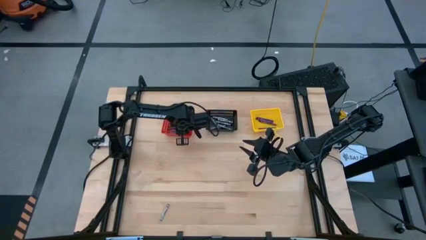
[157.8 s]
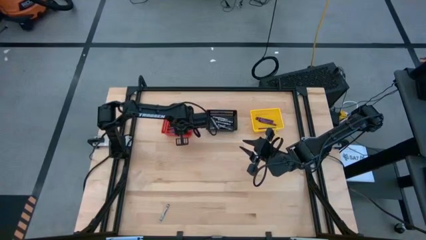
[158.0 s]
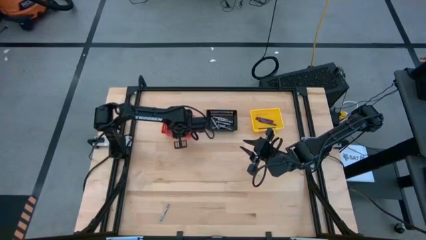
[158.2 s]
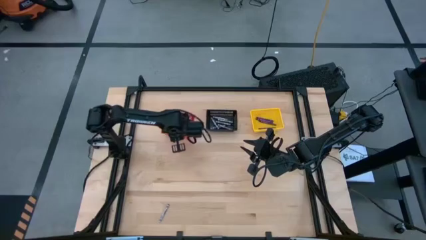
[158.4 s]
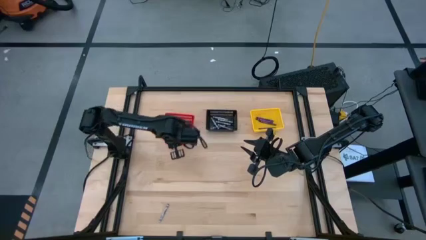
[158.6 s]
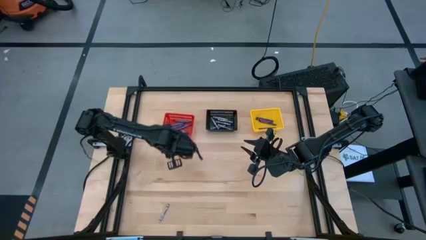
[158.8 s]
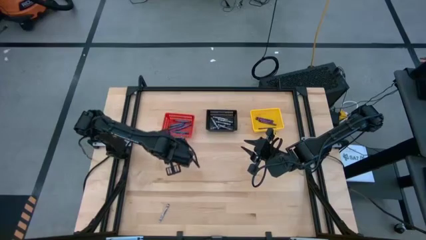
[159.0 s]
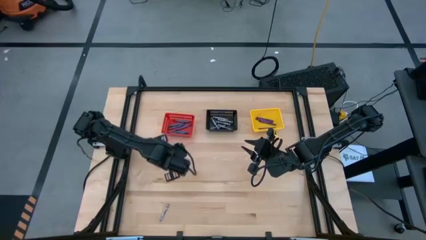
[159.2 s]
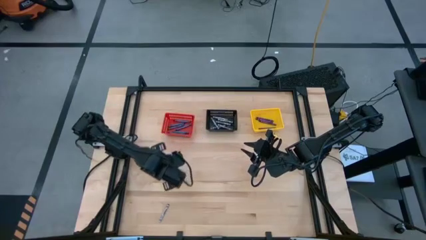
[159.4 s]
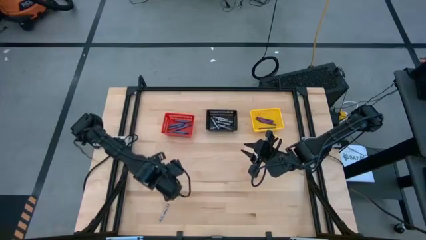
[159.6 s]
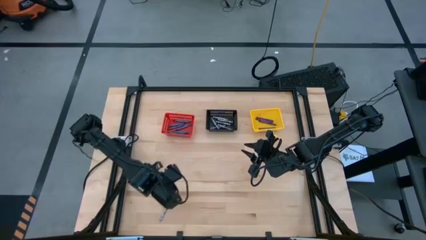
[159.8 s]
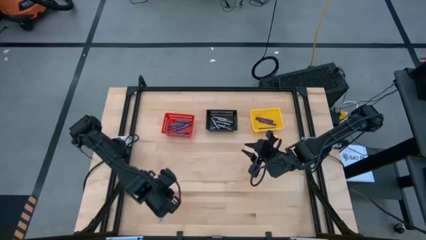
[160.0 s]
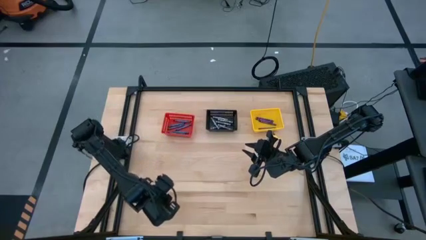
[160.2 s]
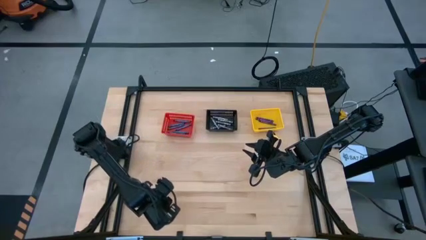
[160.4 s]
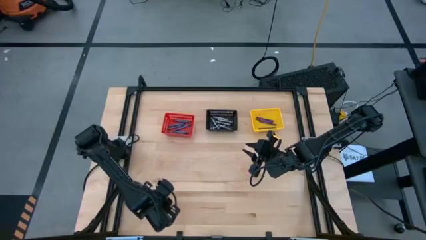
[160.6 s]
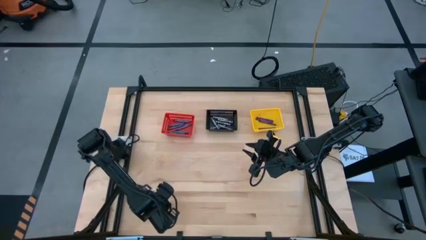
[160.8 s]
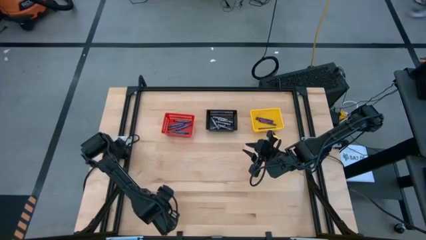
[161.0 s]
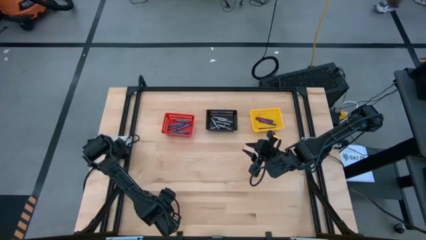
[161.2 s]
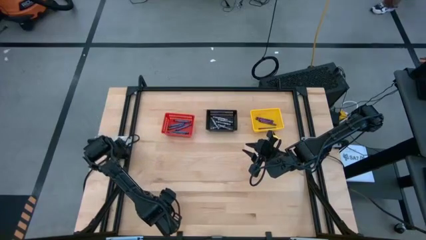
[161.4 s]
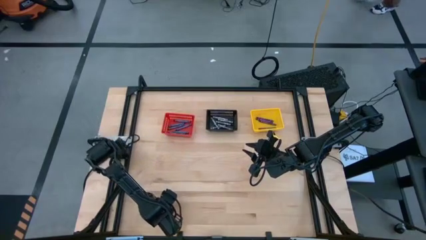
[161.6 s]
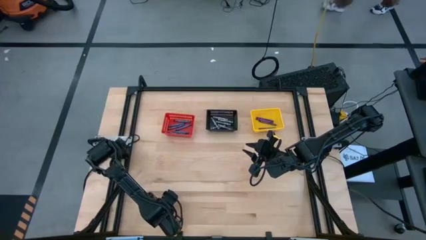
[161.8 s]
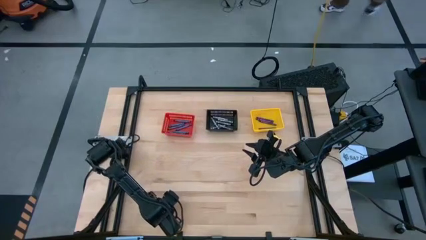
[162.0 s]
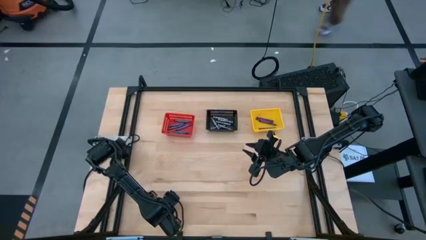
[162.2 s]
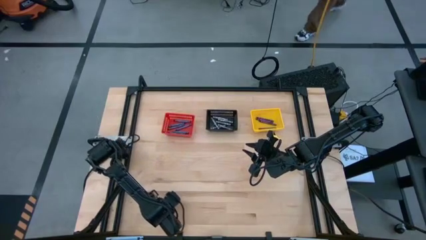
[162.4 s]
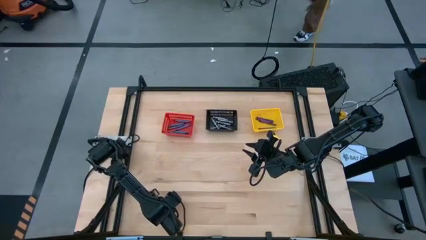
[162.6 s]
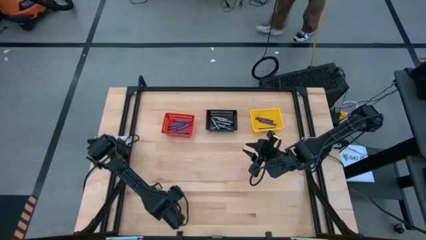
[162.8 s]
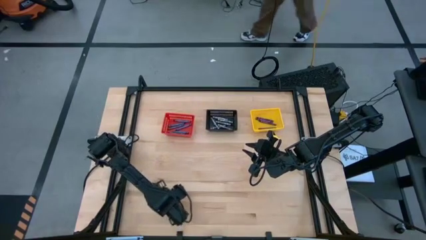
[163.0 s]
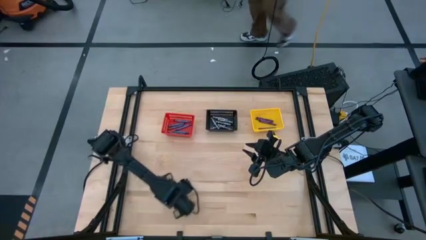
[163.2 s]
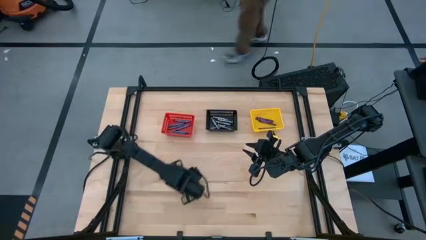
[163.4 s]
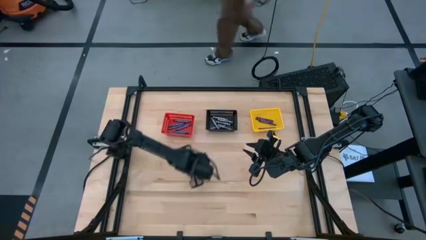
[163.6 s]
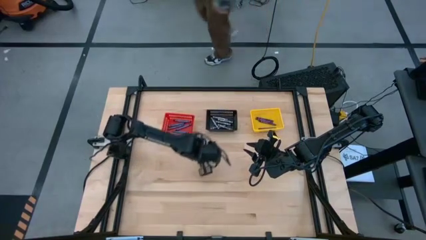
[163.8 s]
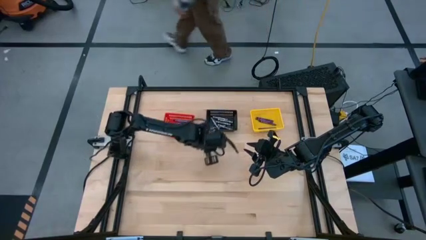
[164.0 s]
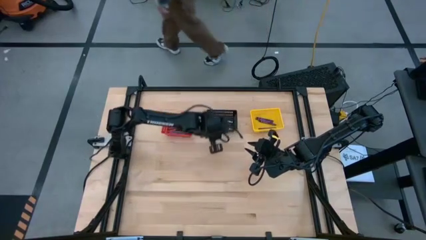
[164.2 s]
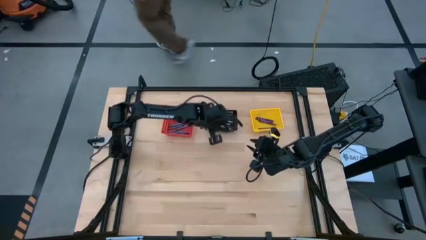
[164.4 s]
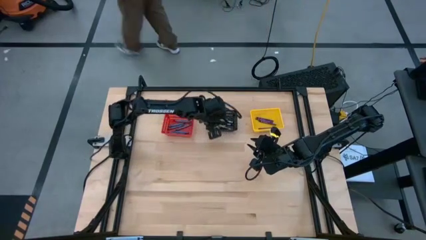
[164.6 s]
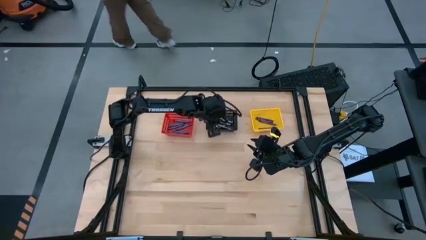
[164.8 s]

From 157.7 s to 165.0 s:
Task: Sort crayons
Put the black crayon into the black basket

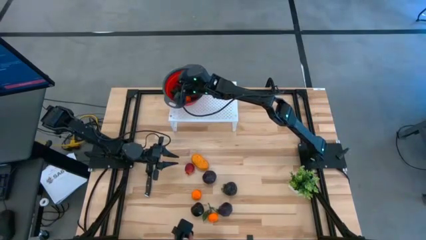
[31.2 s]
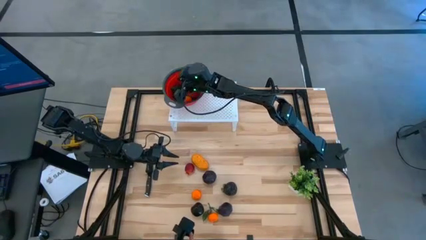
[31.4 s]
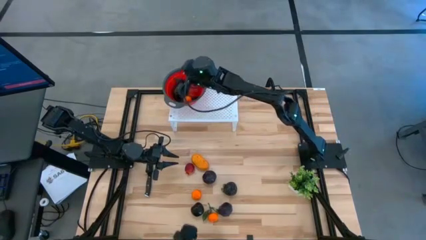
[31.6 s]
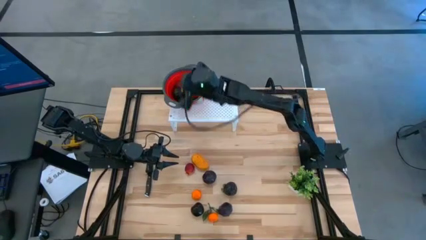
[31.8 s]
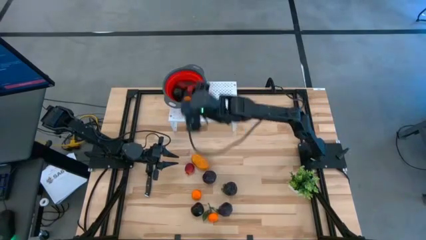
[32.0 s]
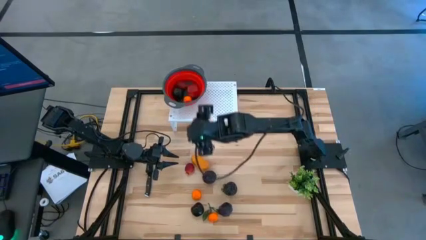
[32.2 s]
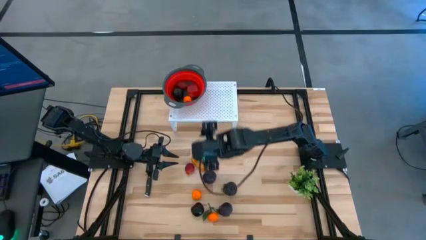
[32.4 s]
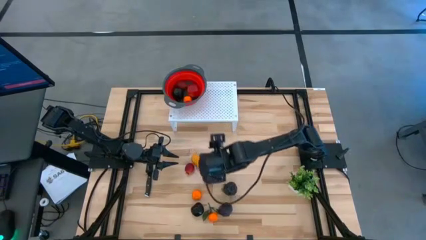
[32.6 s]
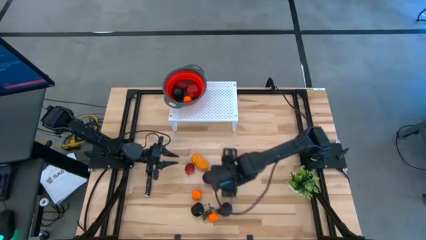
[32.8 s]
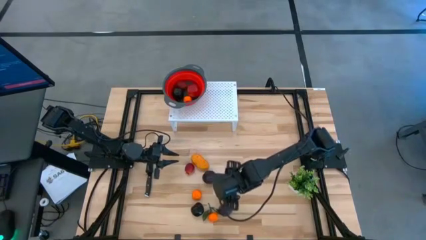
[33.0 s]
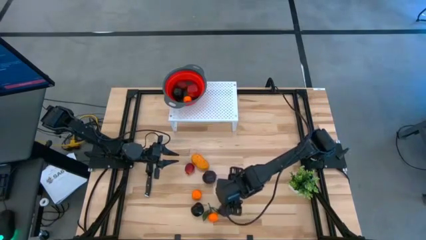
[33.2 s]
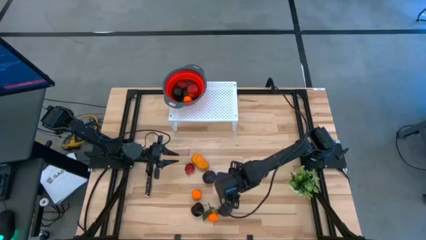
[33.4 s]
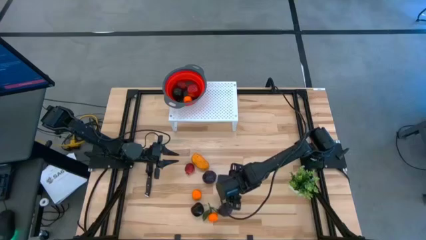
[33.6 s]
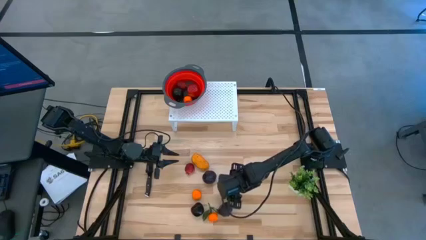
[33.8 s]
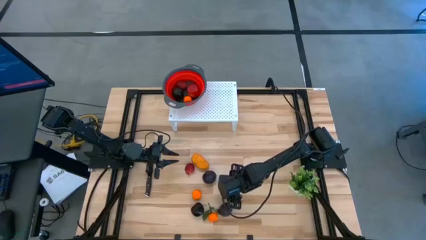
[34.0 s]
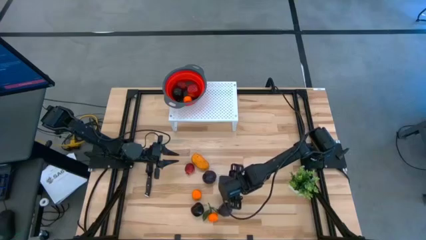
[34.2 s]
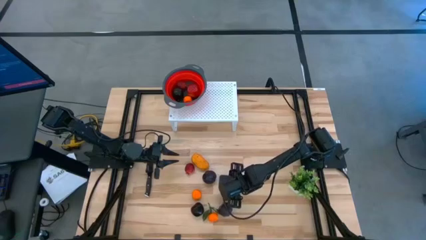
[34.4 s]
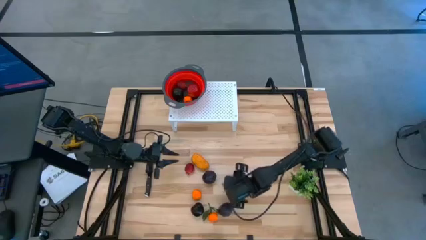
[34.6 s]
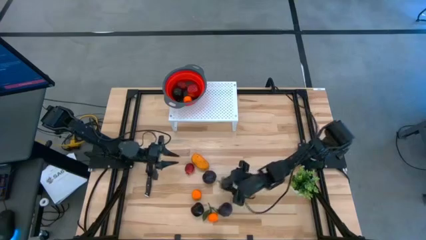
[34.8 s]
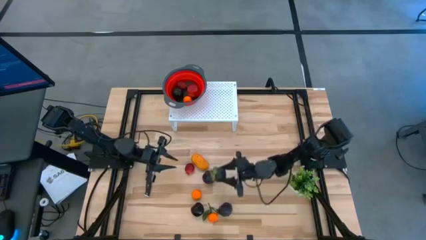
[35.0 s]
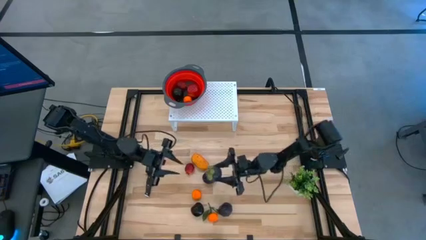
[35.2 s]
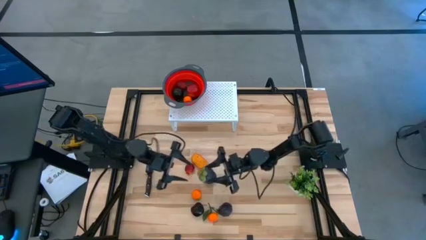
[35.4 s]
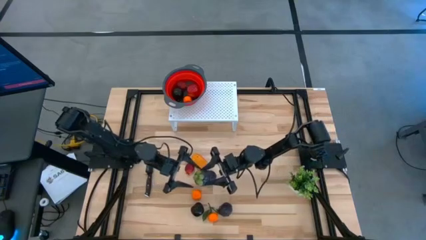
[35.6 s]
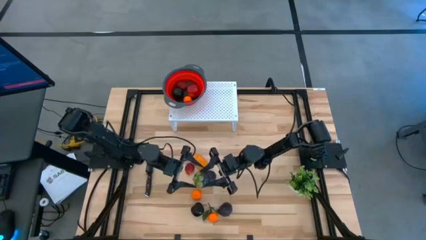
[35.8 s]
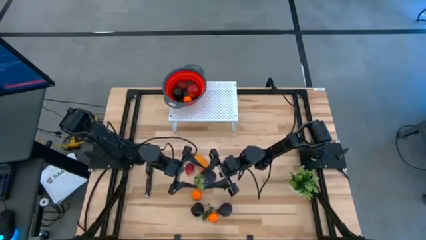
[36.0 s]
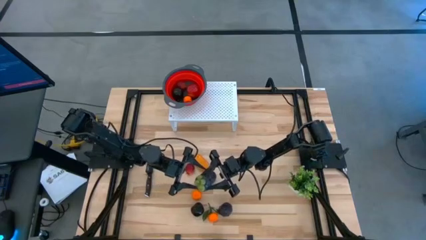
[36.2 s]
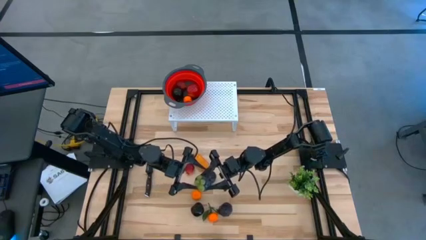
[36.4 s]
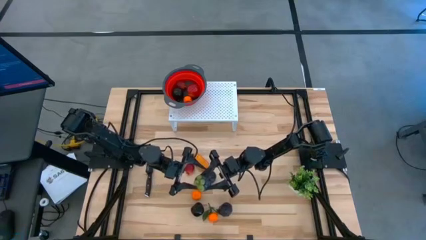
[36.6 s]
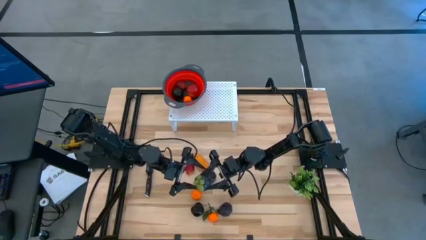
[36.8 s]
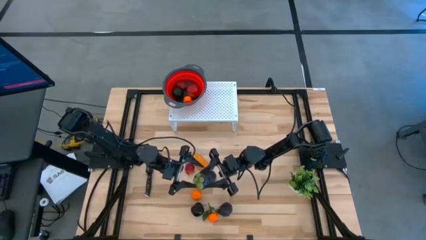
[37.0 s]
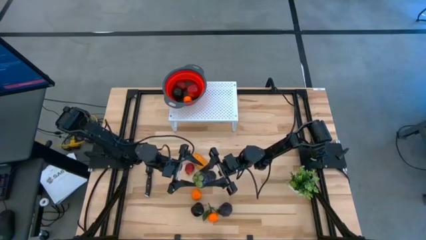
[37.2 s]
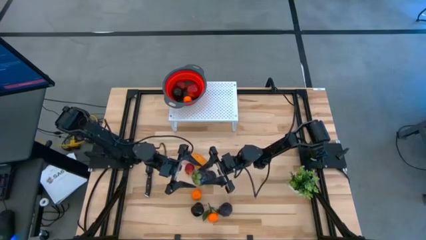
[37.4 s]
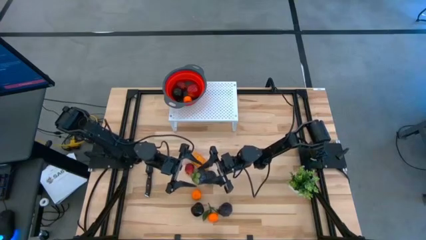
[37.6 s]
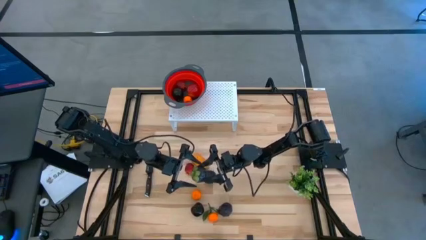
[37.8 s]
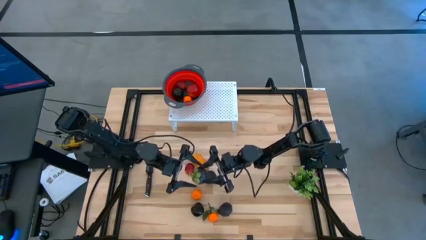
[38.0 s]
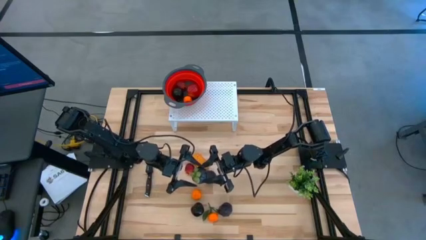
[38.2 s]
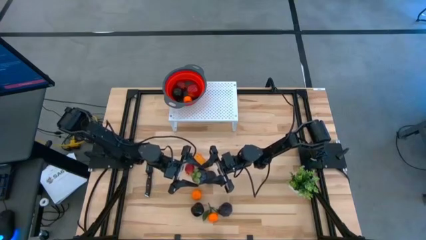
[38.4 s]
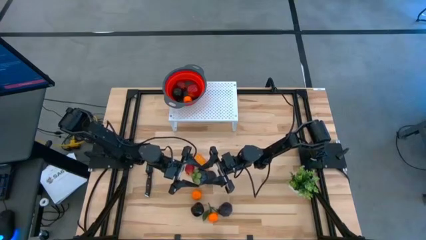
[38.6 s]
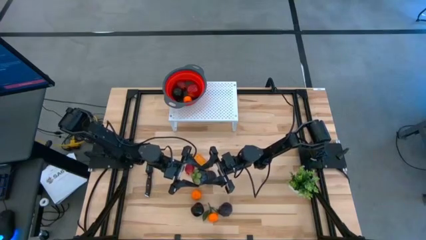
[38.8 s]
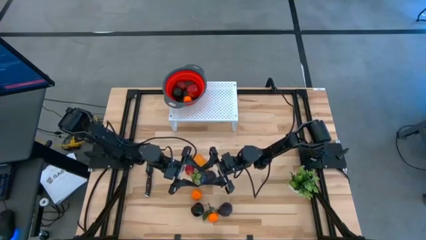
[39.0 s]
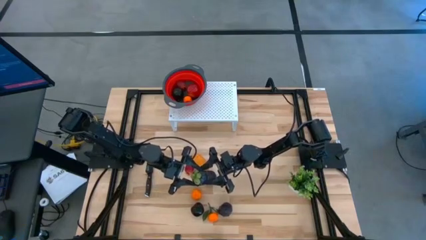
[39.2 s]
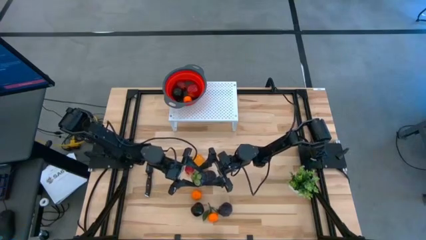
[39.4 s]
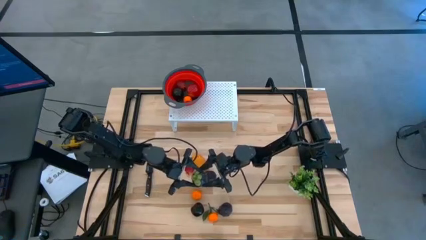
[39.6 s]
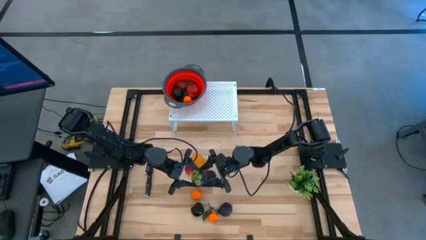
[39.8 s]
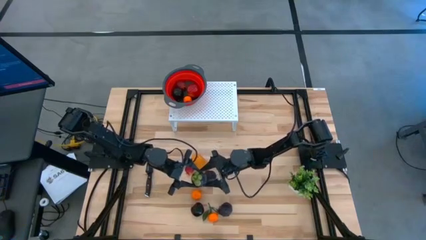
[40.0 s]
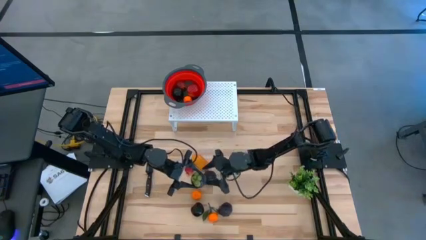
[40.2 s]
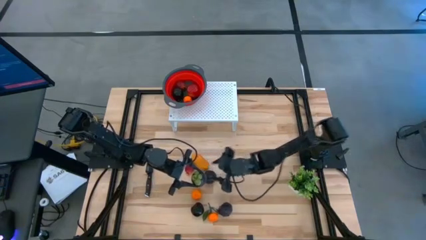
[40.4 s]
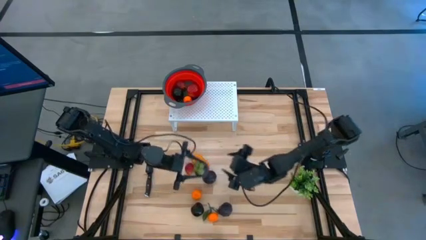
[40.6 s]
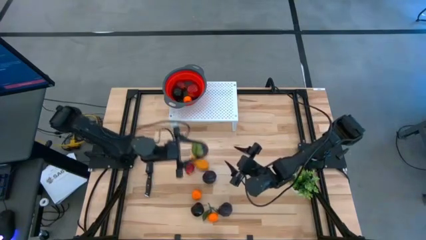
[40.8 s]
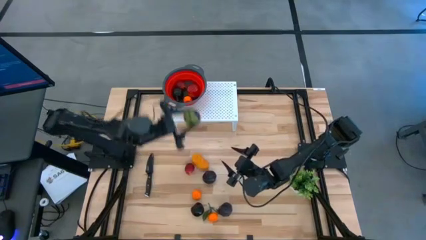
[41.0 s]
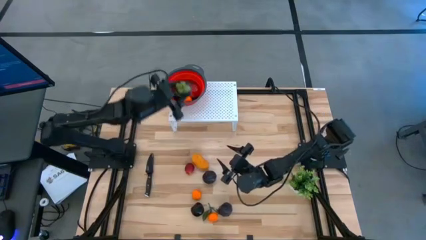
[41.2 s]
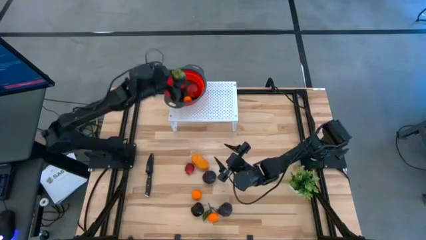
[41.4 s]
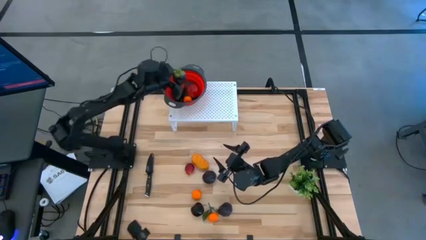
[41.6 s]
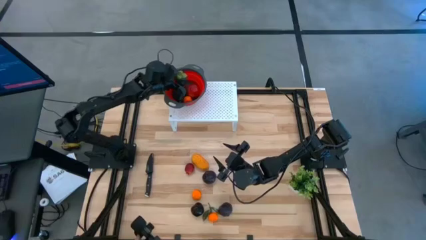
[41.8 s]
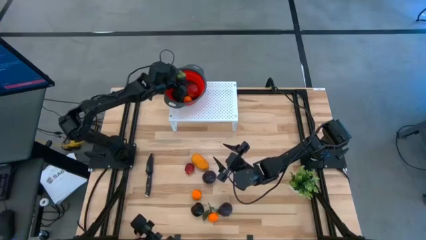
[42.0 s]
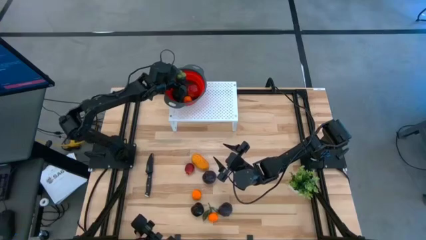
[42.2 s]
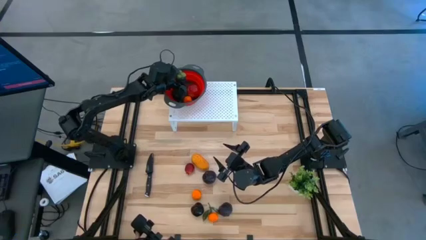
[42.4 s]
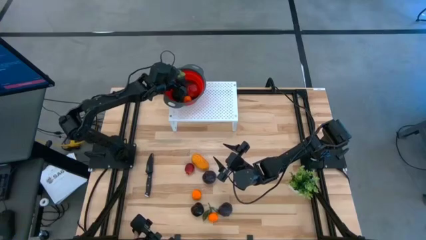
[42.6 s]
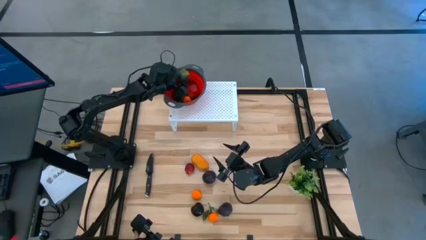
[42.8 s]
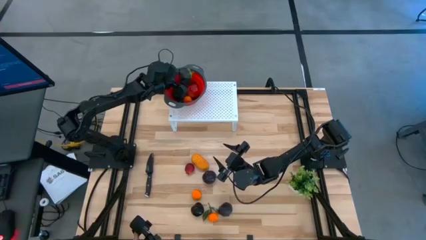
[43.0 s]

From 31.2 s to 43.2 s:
Task: Pick & Place Fruit
Put the purple mangosteen into the red strainer bowl on the shelf
